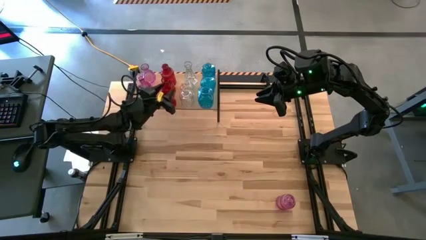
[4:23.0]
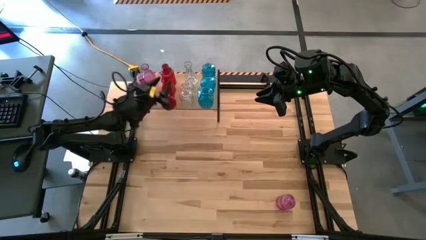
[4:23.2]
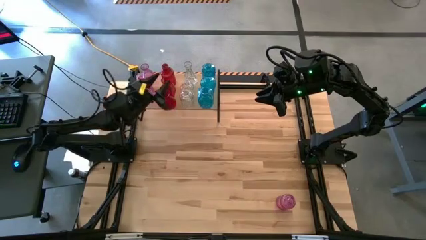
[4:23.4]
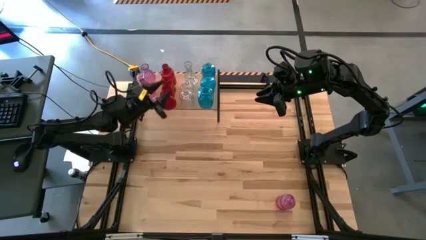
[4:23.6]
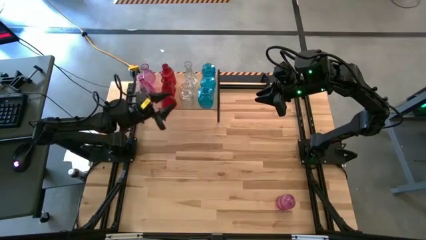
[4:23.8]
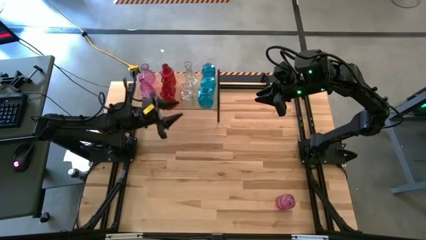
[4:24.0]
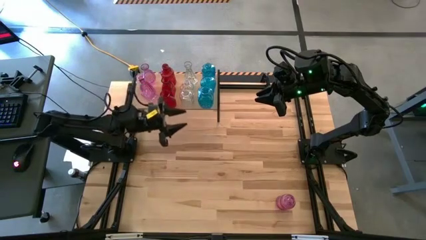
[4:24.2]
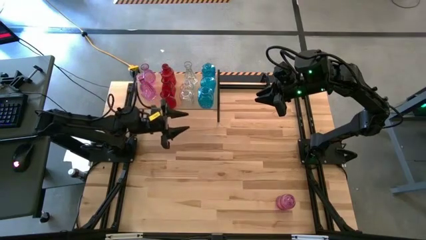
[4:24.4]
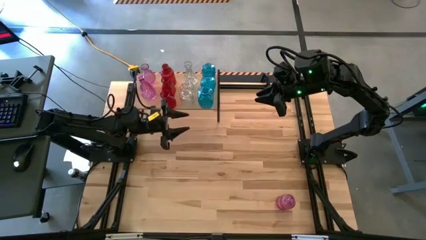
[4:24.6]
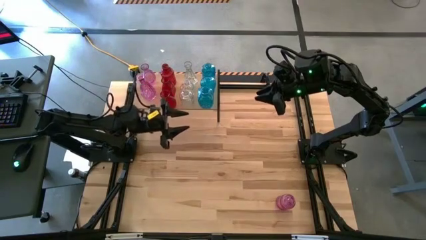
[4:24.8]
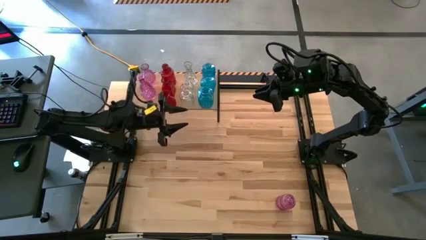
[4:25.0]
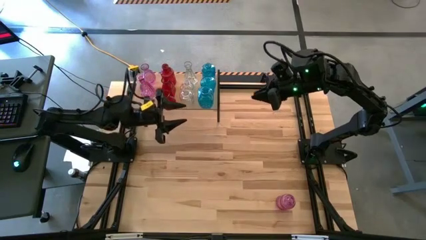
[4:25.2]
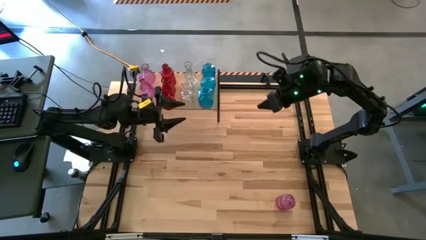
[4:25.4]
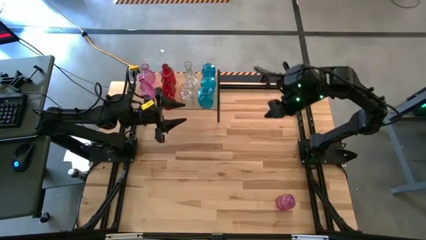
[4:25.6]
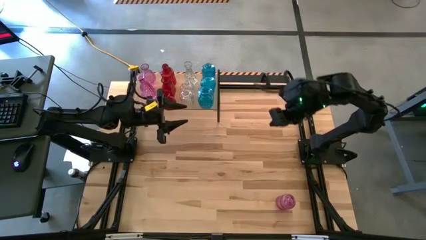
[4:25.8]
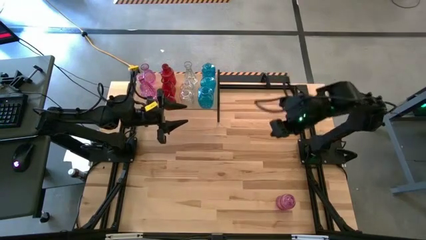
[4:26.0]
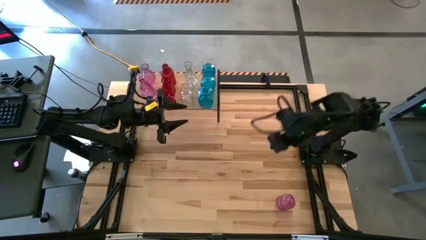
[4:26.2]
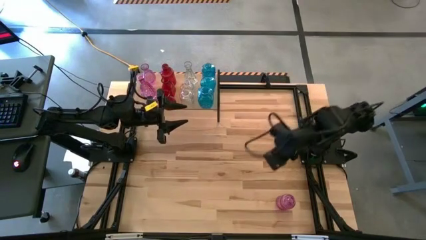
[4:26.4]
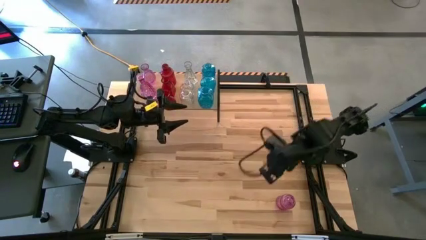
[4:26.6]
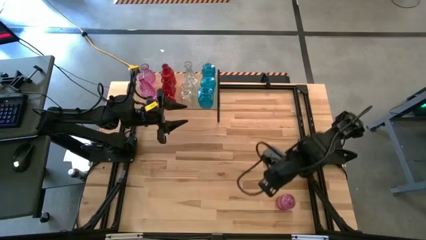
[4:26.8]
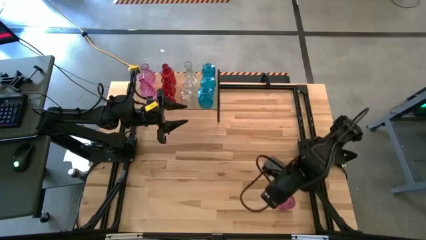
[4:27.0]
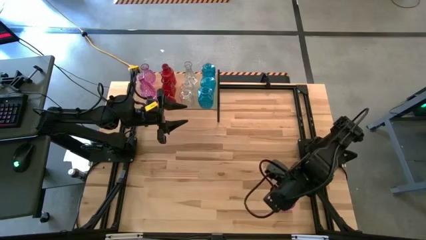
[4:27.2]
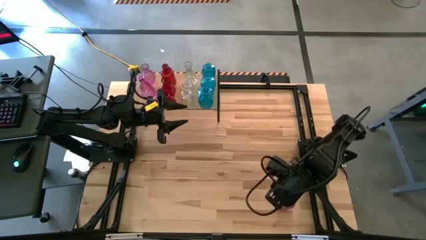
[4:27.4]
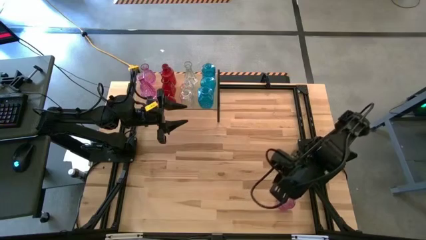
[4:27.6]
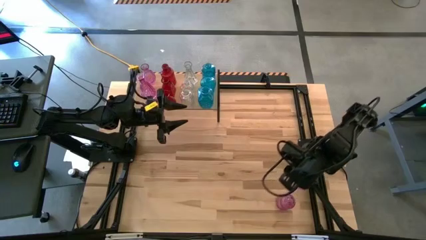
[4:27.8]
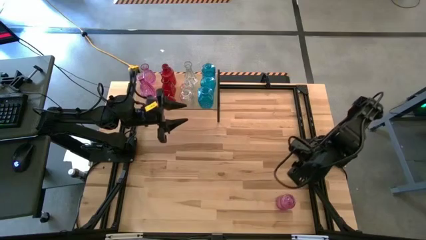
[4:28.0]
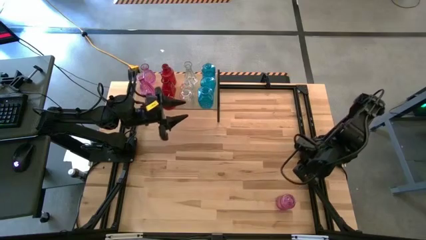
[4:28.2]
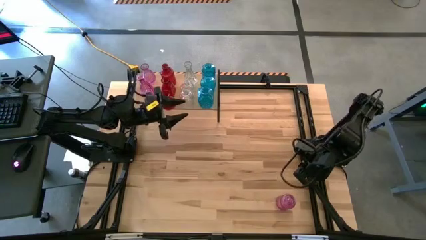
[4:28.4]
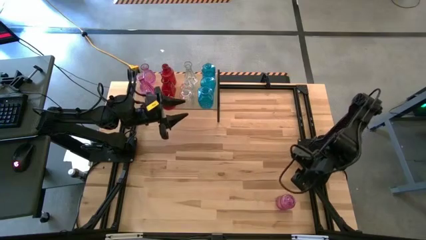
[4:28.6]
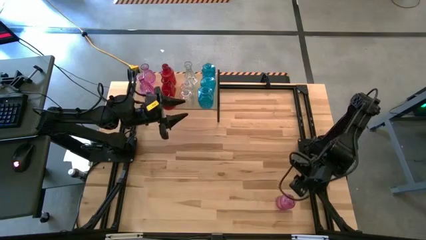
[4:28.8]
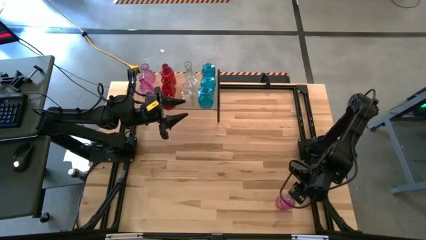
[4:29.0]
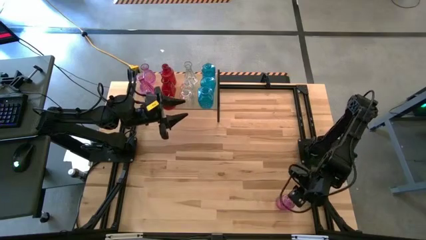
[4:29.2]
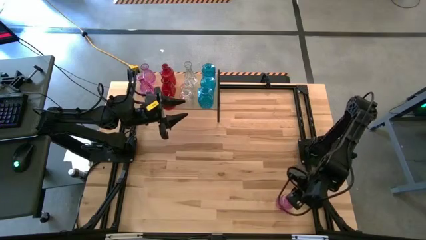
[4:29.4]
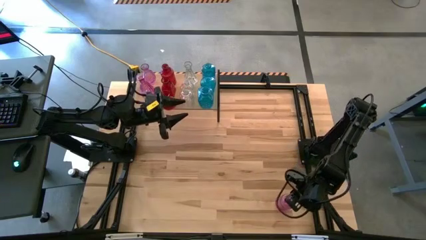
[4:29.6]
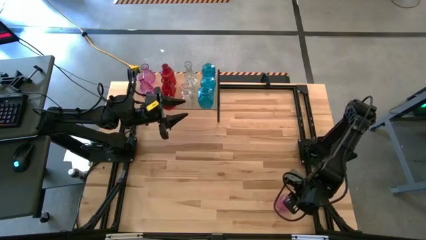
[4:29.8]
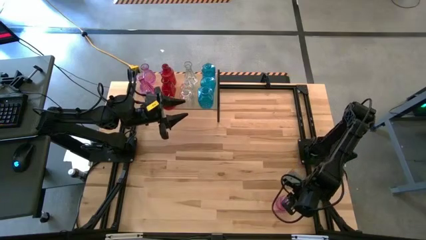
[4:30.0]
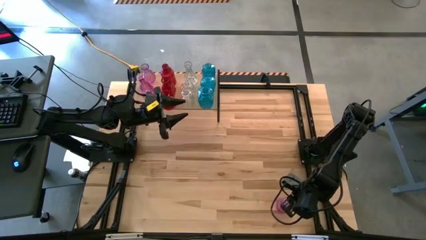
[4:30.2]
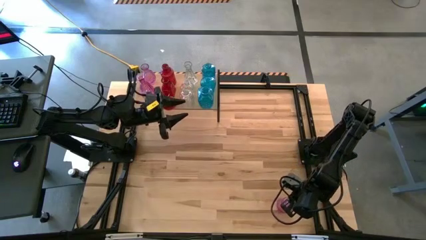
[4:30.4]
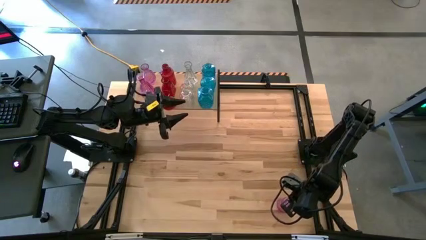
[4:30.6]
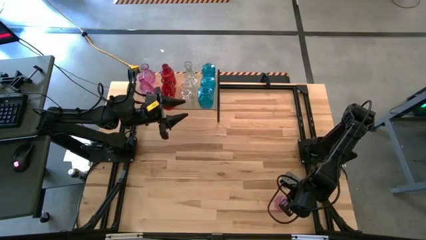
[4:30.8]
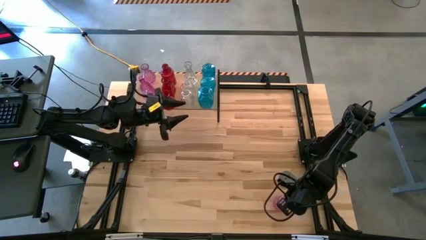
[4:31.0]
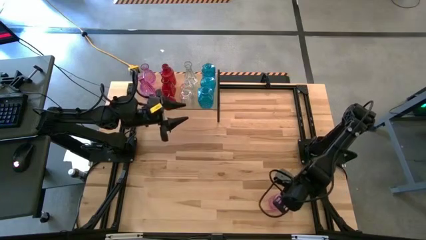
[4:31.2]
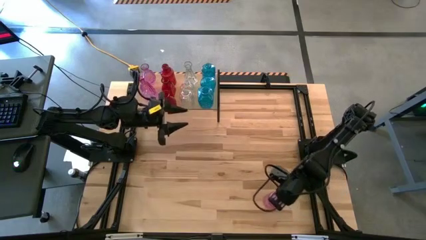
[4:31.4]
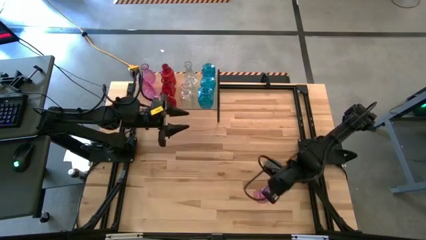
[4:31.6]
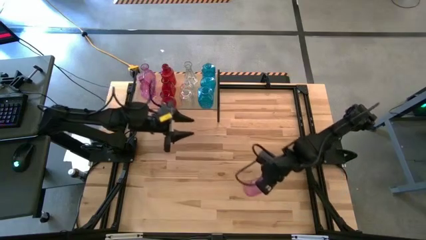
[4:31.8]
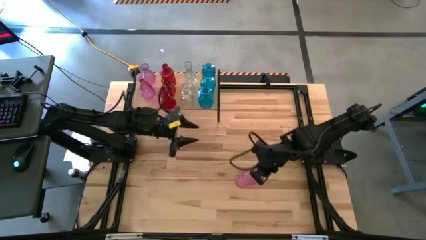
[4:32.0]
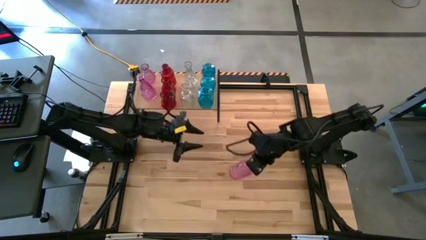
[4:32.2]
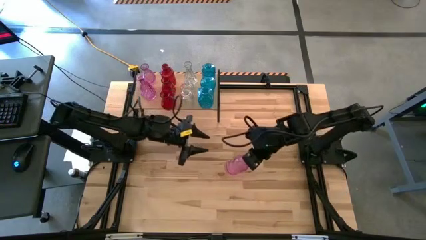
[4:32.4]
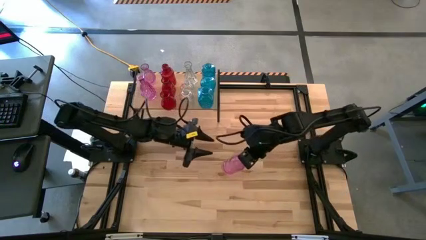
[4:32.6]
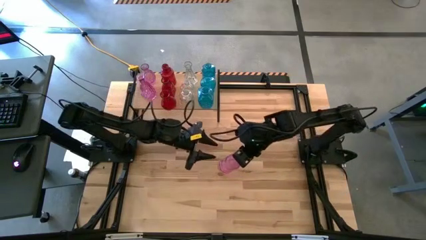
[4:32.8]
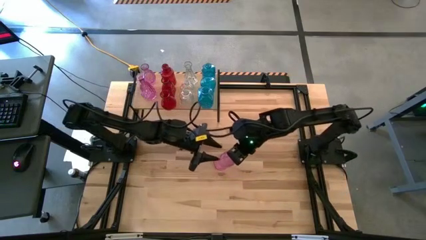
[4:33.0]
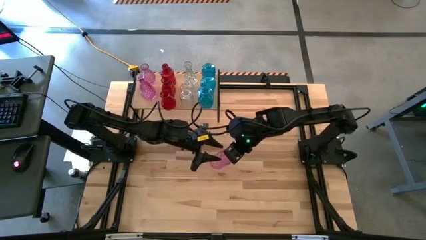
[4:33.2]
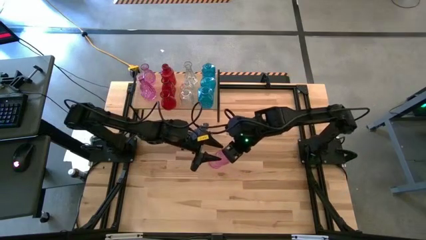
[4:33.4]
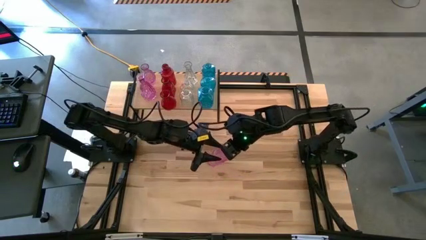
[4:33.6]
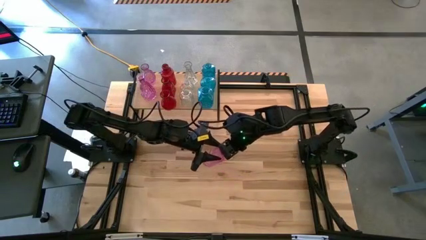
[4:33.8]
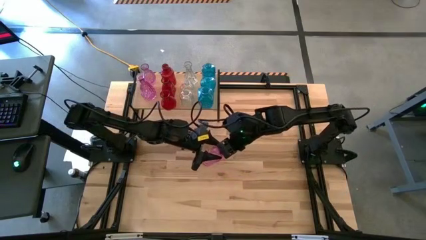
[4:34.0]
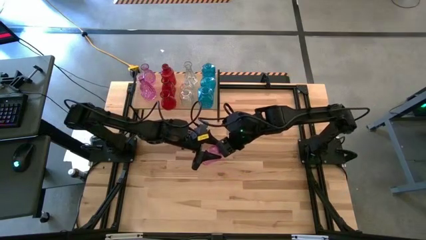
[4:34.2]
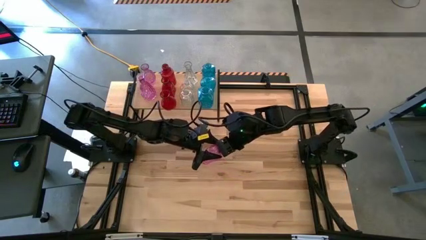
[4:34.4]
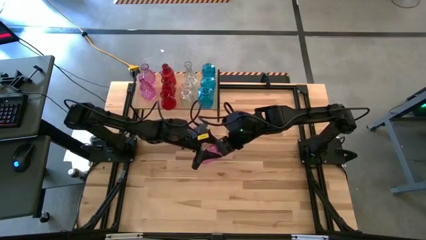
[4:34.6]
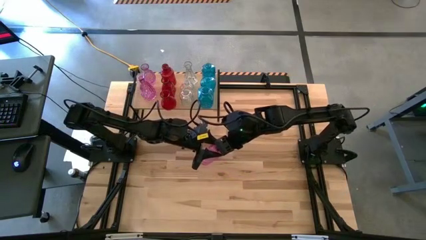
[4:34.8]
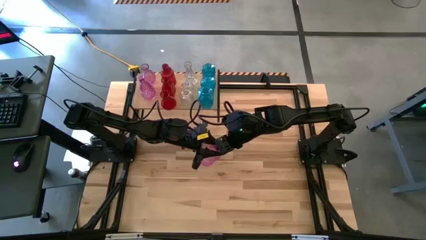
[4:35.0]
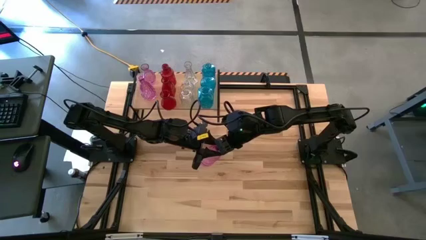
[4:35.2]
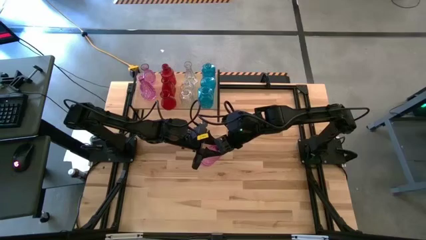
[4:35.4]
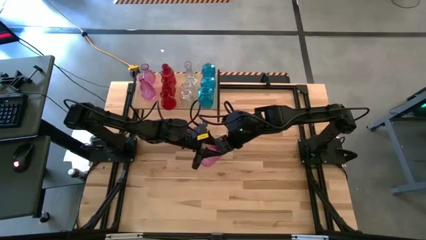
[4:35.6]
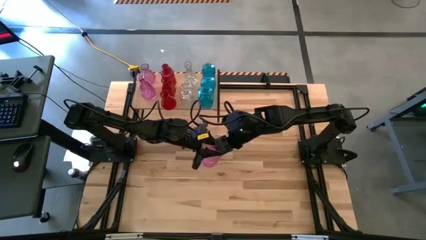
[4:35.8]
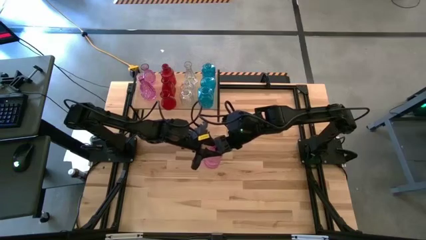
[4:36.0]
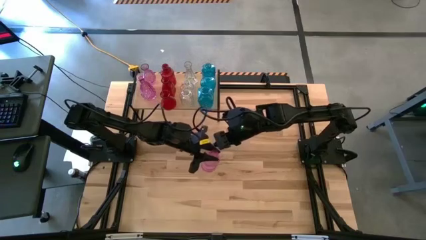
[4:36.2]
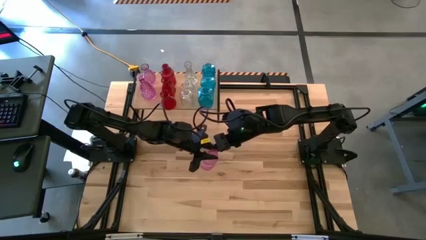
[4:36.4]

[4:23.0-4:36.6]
Task: sort vases onto shelf
Put the purple vase on the shelf aligned with the other purple vases

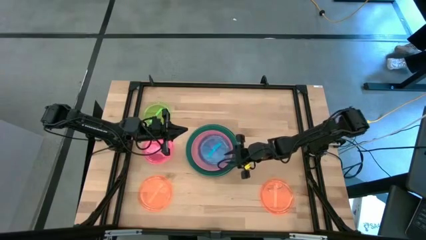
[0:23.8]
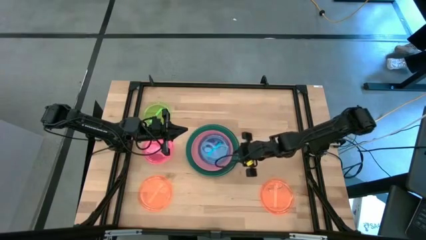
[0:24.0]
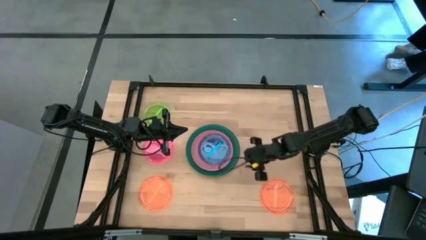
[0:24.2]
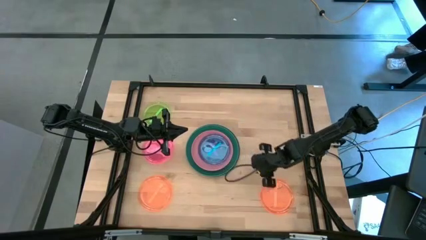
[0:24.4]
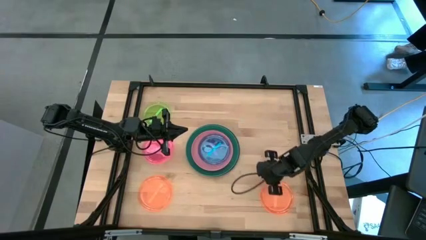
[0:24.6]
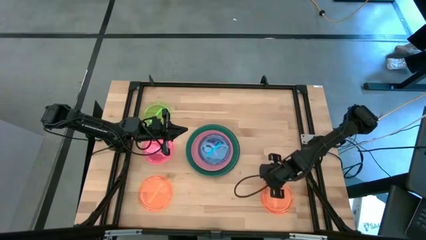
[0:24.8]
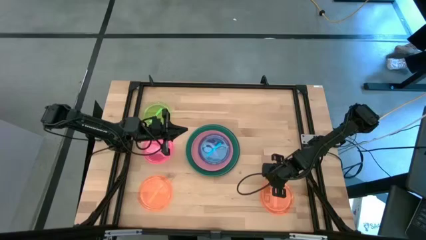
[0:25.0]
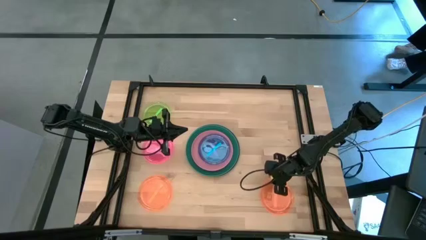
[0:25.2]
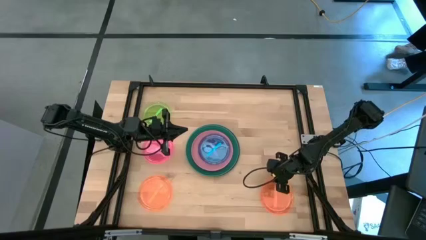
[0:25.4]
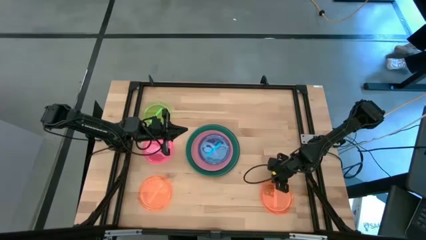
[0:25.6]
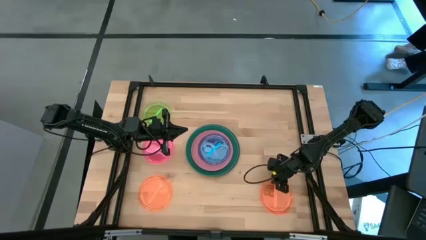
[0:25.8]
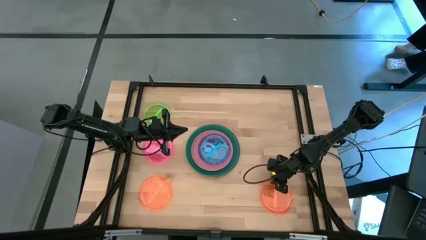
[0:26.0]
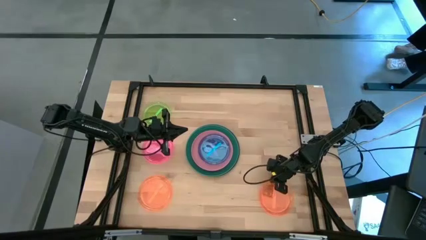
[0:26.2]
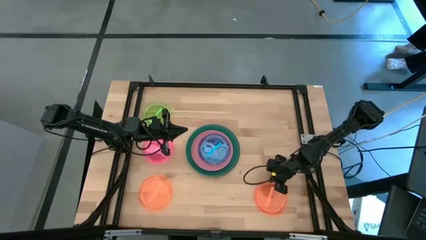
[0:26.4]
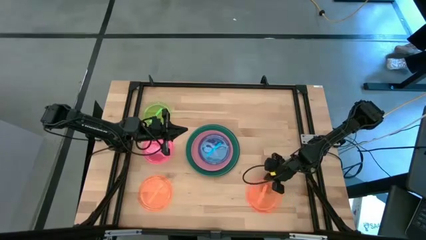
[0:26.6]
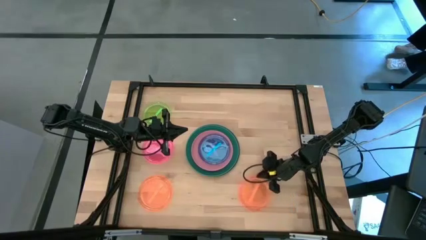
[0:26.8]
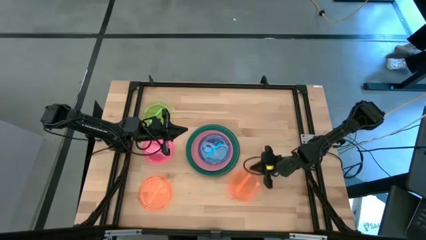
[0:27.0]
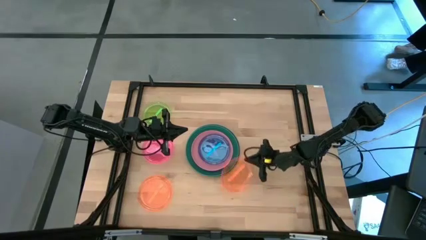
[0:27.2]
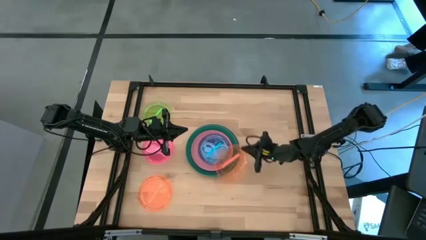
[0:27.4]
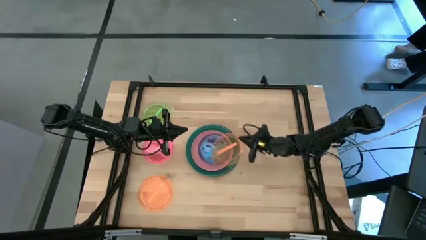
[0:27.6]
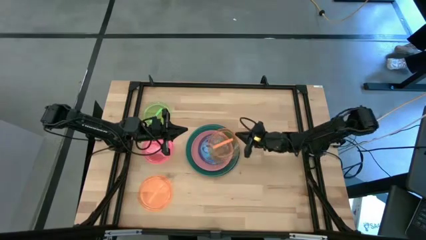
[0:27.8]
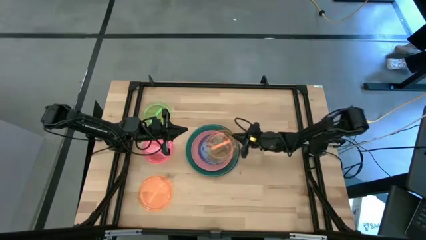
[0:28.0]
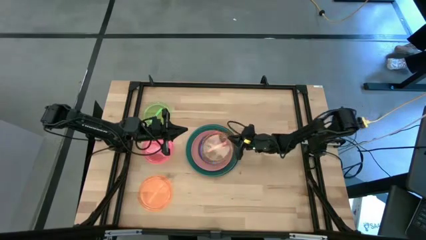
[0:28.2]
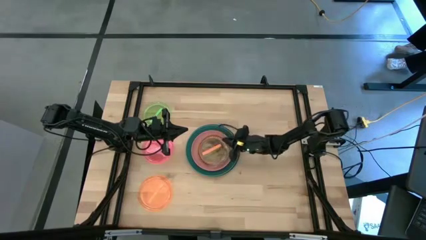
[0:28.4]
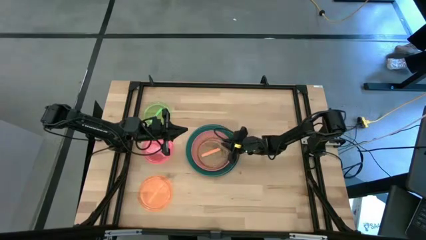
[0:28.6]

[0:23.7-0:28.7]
Task: Stack plastic plates
Stack the right orange plate on top of the blue plate
